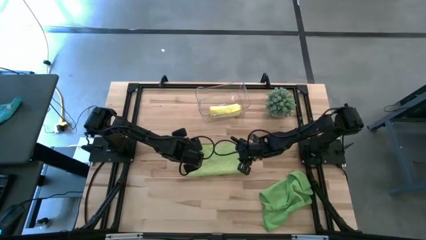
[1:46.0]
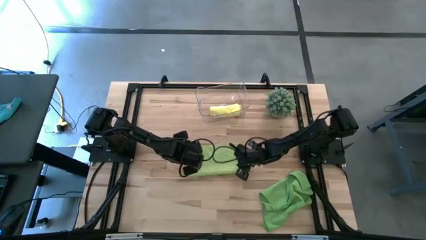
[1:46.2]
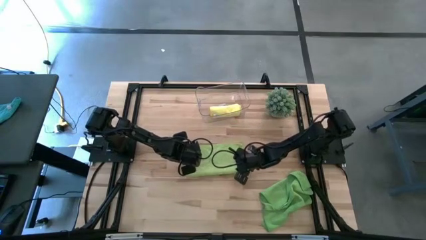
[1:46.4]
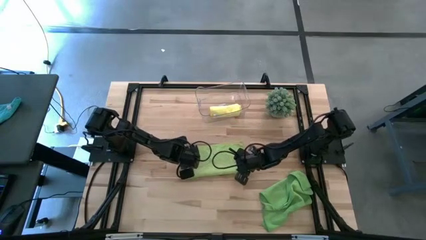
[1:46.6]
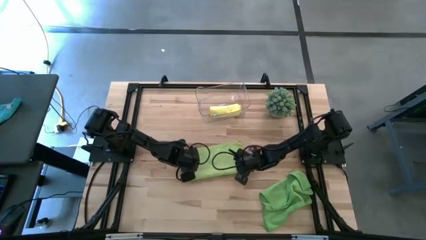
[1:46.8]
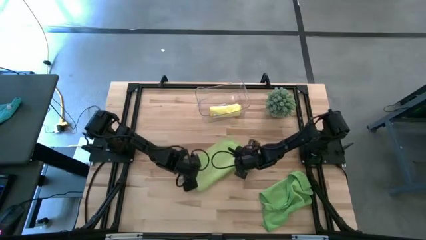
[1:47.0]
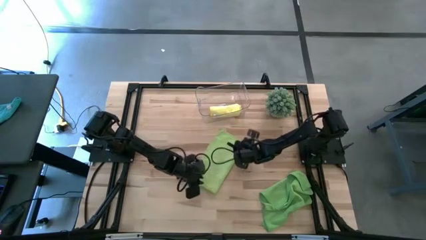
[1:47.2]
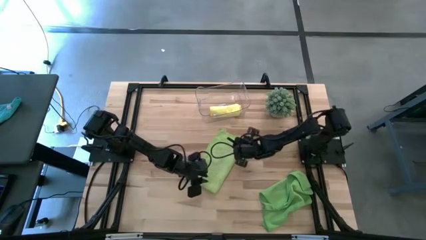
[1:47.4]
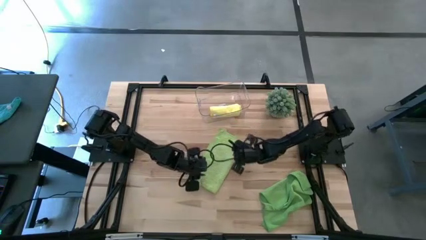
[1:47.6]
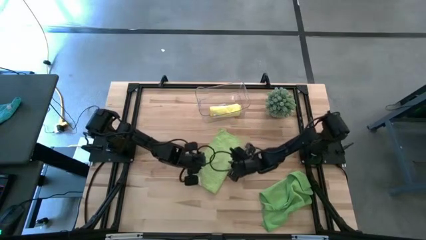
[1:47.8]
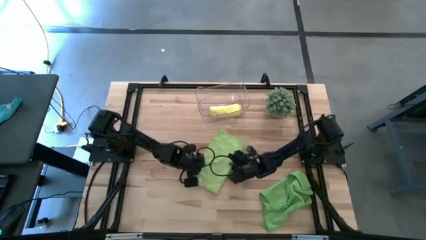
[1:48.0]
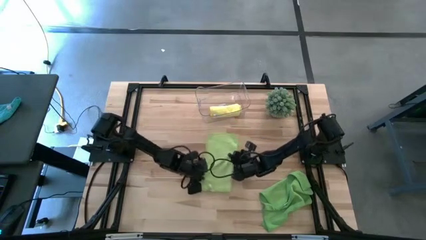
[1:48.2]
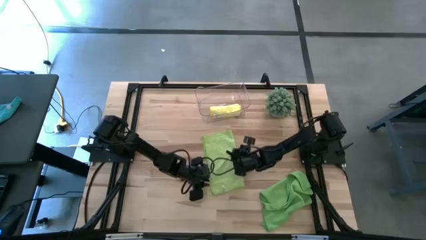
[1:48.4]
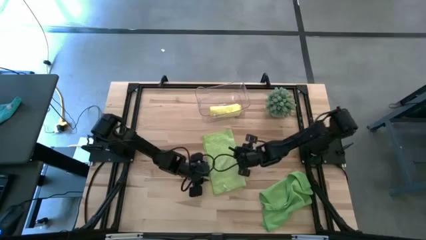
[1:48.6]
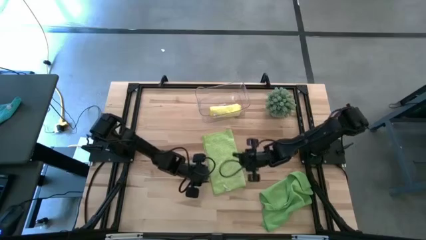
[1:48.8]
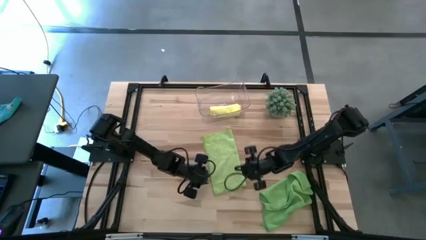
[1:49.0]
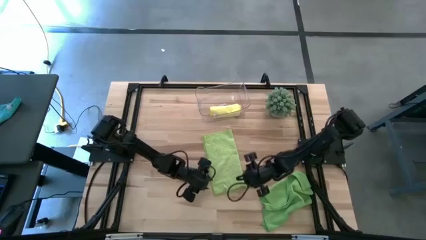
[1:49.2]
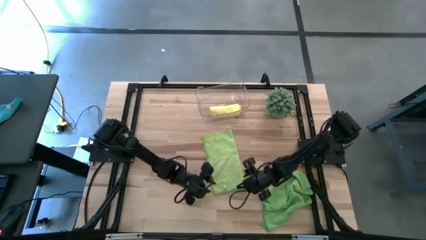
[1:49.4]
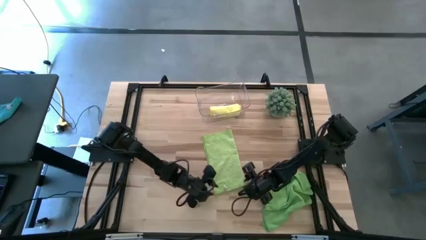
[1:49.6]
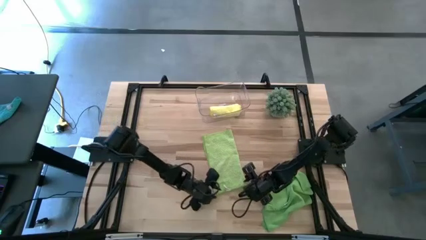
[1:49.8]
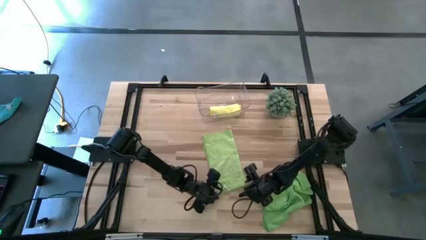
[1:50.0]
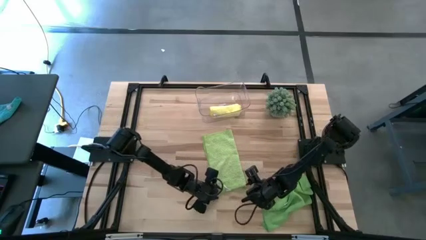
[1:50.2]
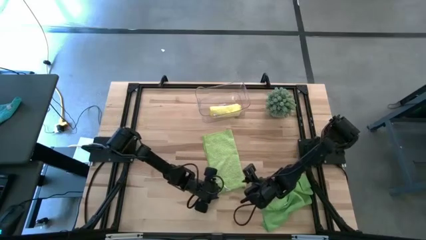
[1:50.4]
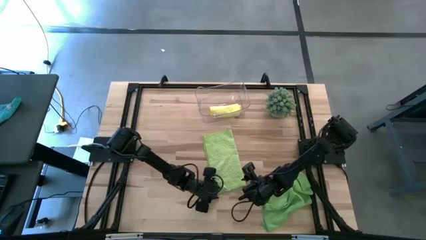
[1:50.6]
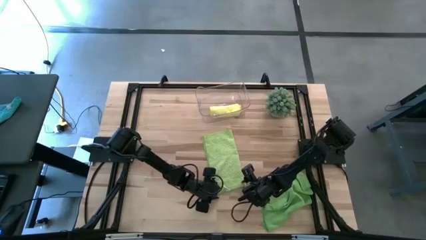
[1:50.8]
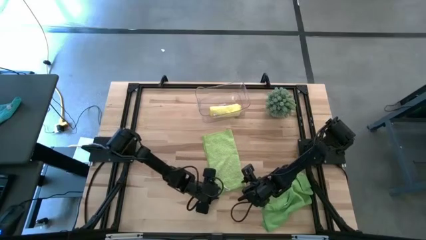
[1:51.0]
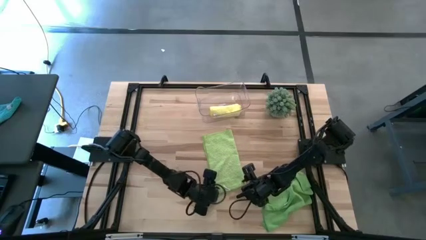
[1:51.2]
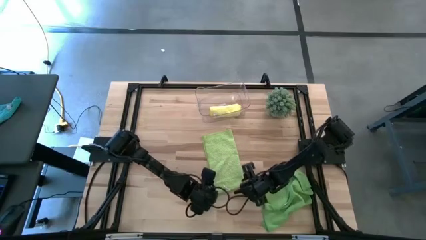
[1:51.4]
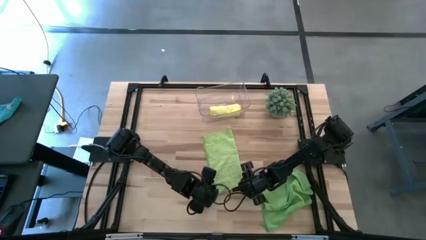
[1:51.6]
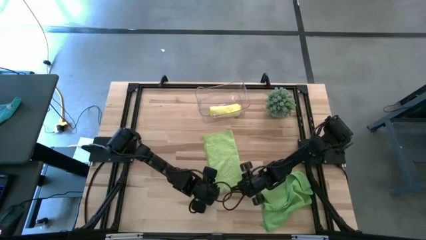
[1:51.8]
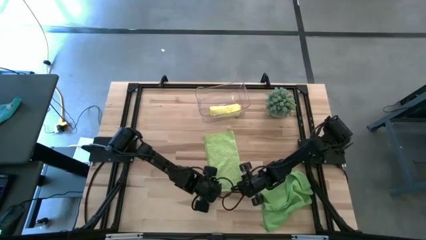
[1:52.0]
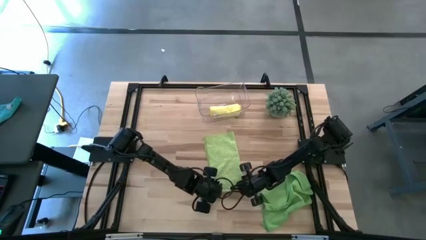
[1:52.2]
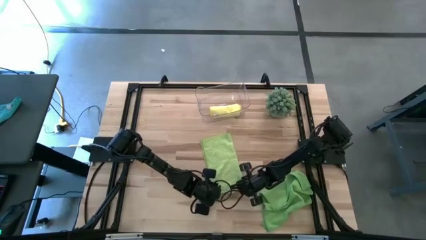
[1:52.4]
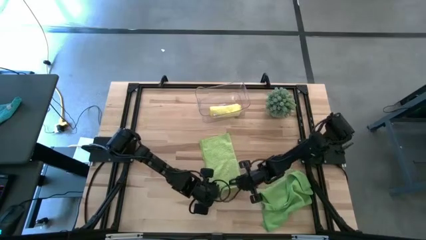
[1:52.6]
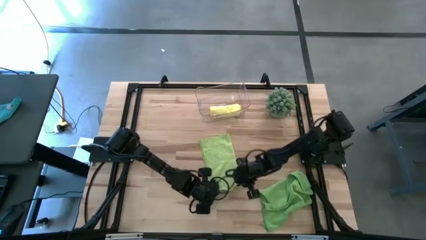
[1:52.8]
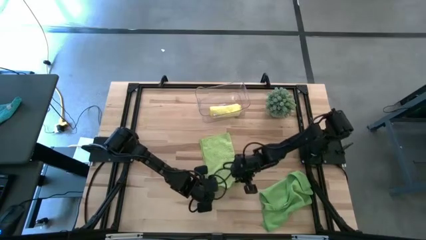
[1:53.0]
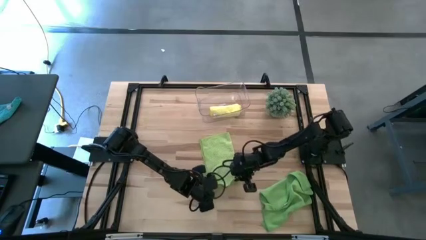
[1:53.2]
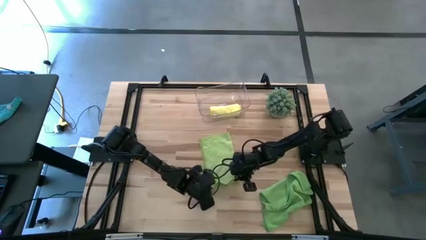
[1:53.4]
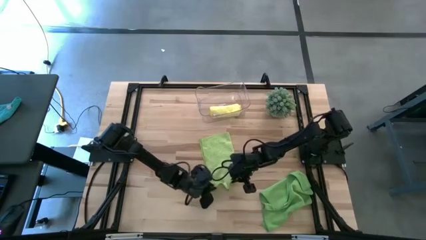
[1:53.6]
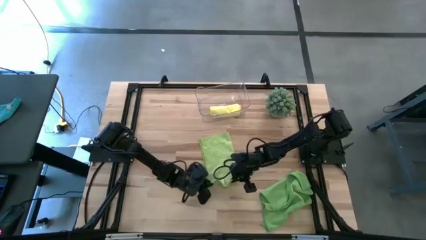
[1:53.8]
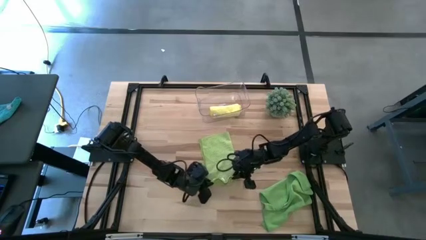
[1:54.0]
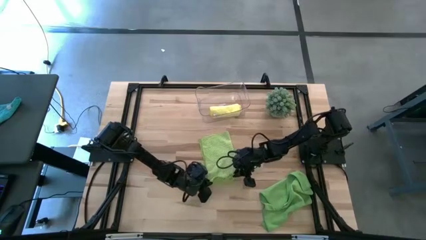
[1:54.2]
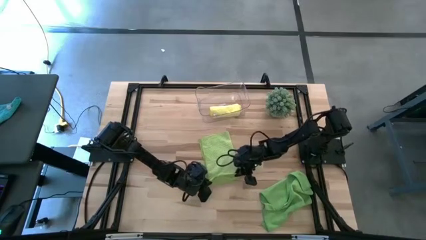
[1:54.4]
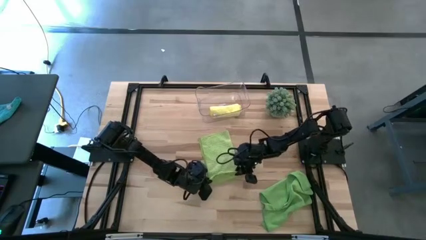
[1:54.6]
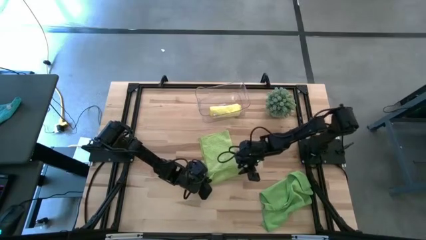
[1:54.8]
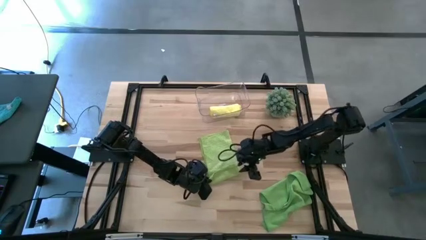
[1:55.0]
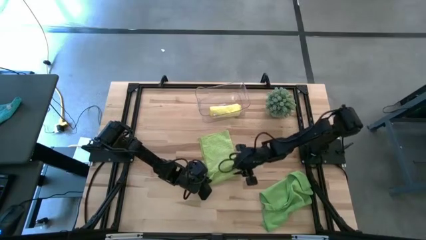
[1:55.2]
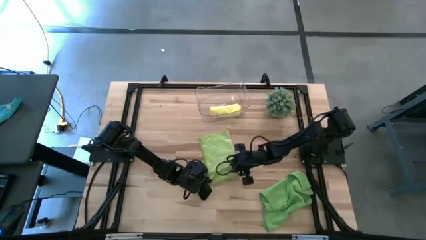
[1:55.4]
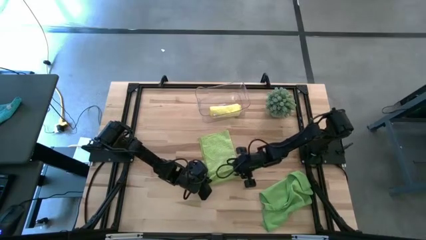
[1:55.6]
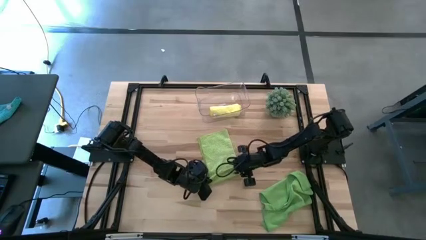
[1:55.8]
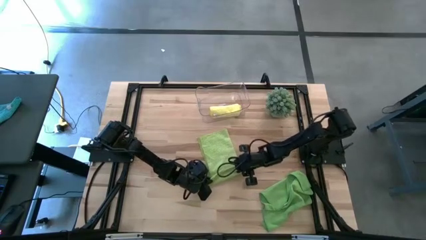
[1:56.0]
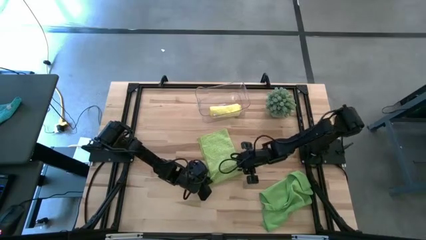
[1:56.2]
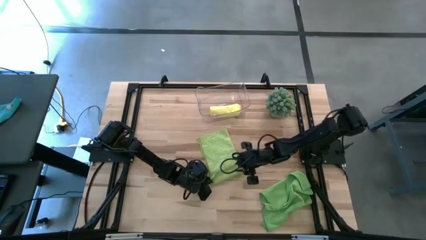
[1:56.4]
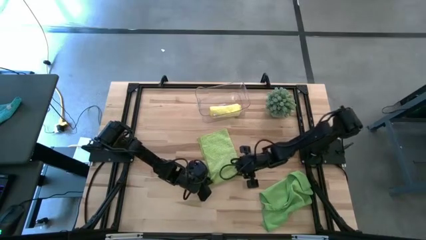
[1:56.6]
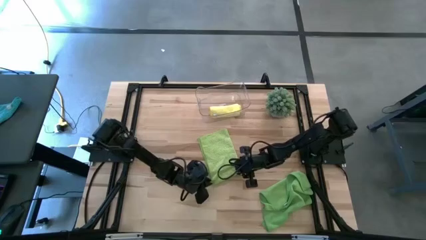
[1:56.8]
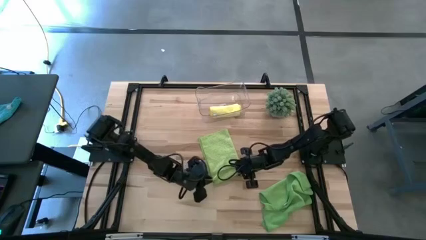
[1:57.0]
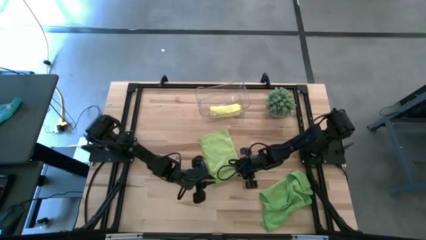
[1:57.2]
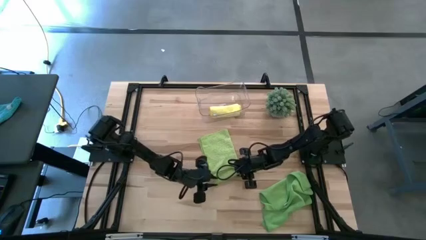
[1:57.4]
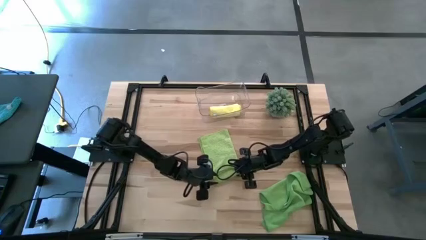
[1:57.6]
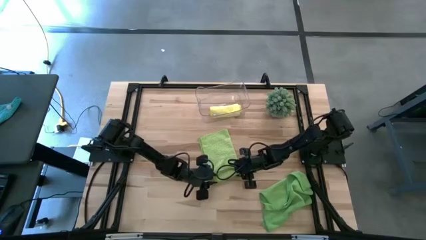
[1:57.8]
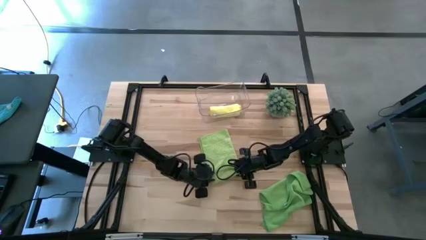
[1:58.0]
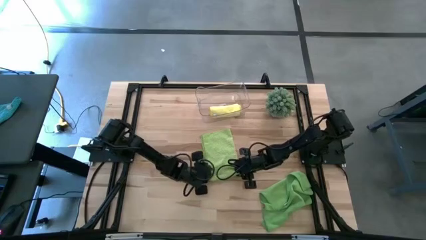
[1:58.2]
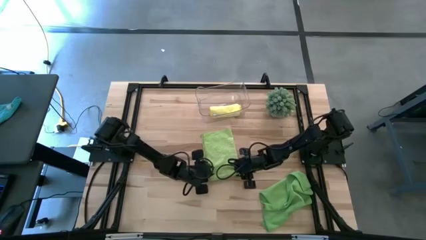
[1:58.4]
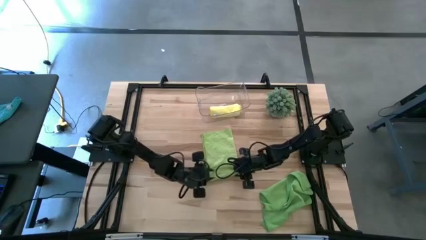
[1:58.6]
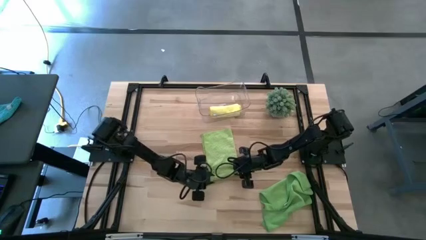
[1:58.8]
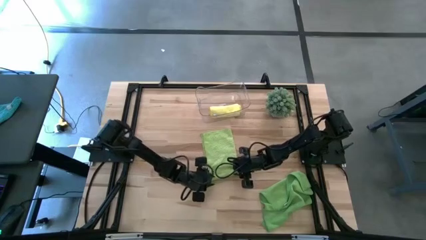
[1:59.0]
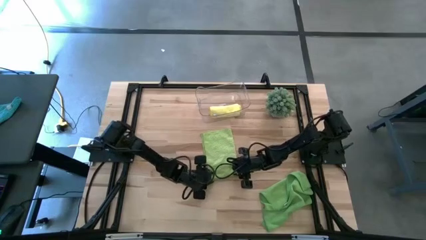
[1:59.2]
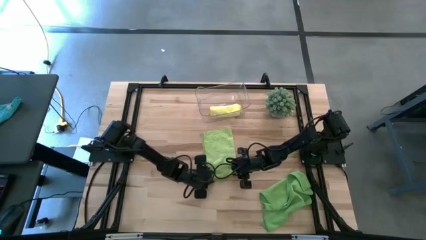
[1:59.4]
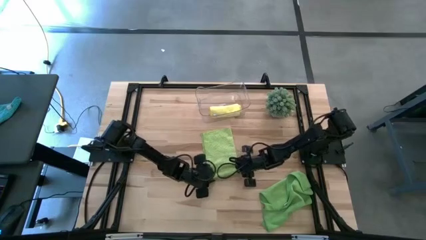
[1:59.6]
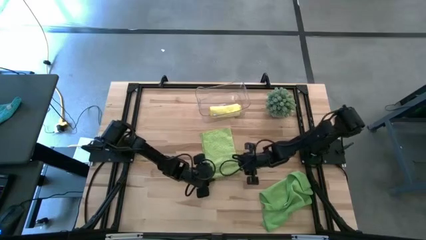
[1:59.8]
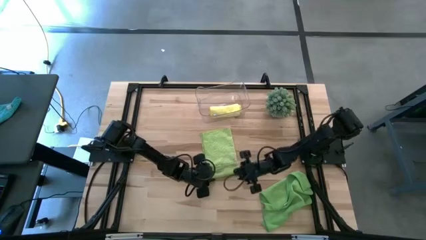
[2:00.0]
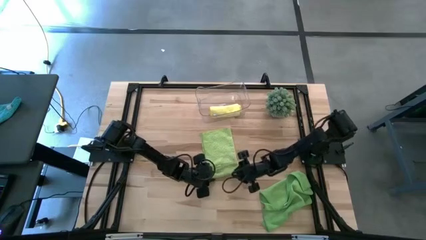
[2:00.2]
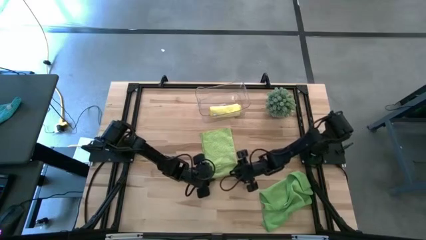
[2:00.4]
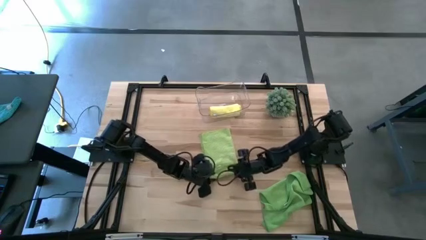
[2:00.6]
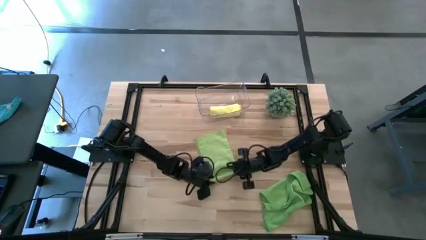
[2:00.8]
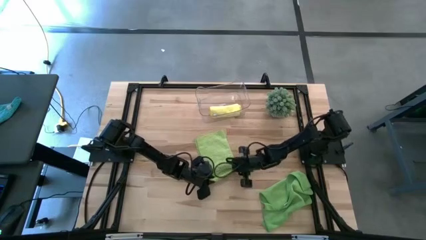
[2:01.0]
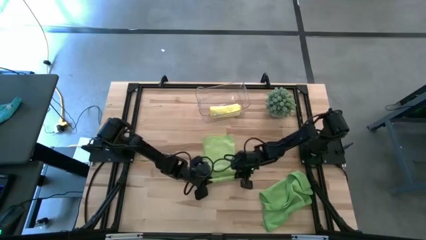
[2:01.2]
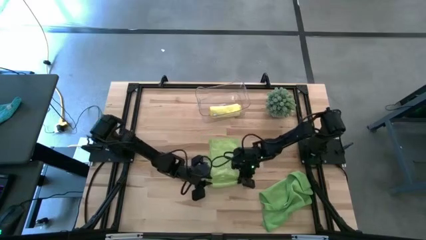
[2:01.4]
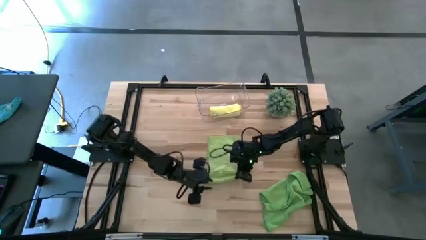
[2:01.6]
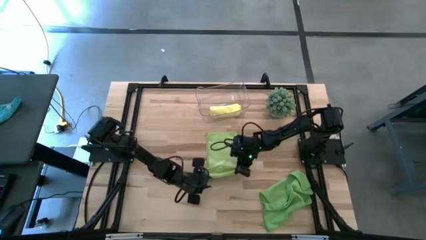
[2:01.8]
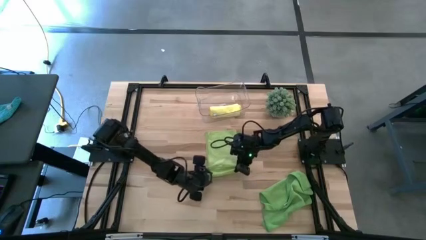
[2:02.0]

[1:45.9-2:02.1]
Task: Roll microfiber towels into tight, uniform cylinder then place into a basket
Roll the light green microfiber towel
